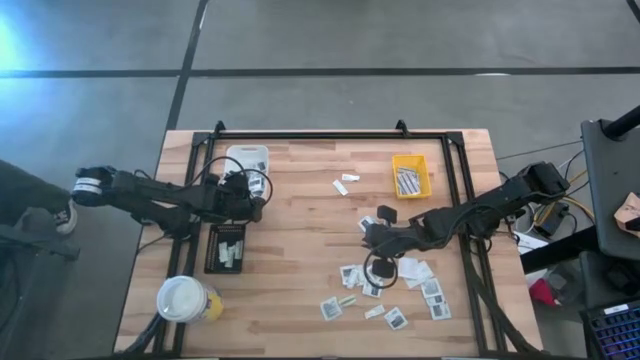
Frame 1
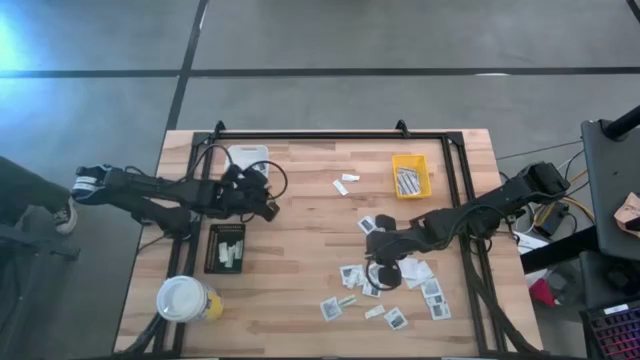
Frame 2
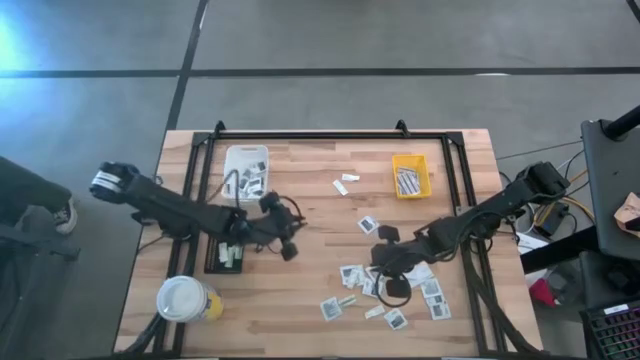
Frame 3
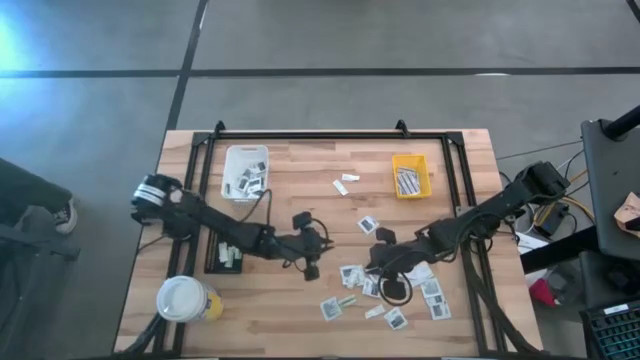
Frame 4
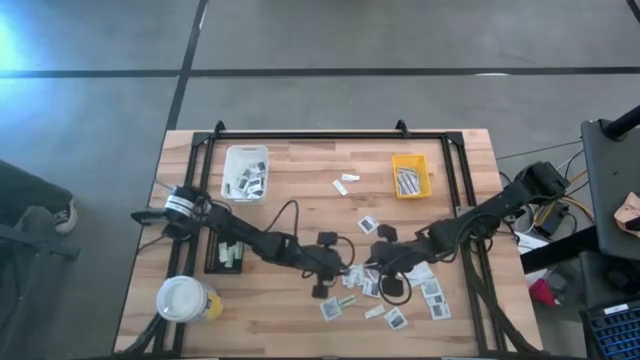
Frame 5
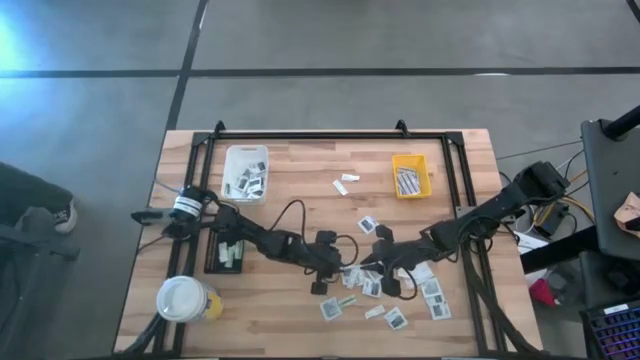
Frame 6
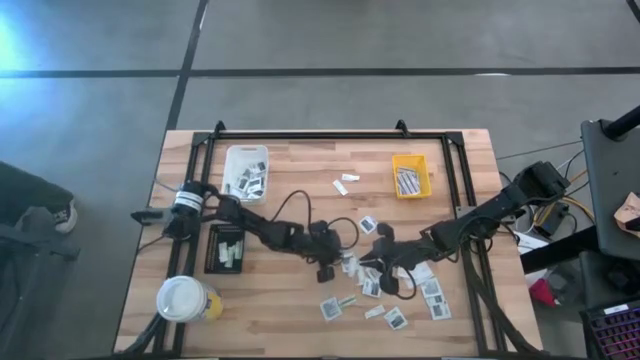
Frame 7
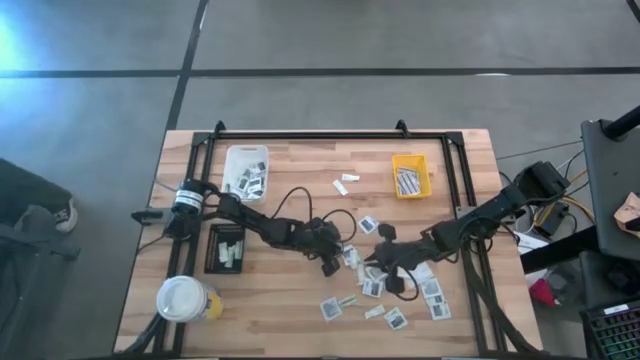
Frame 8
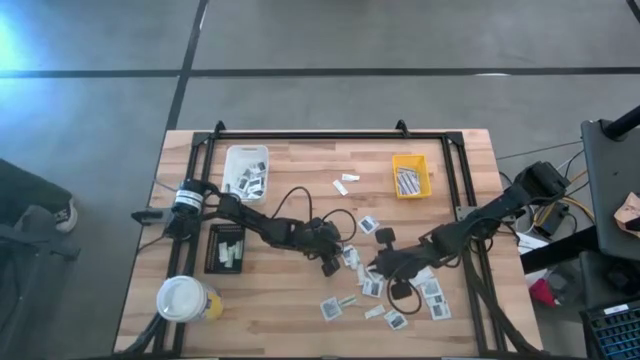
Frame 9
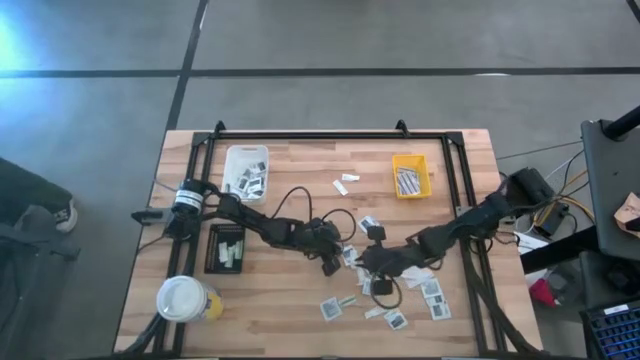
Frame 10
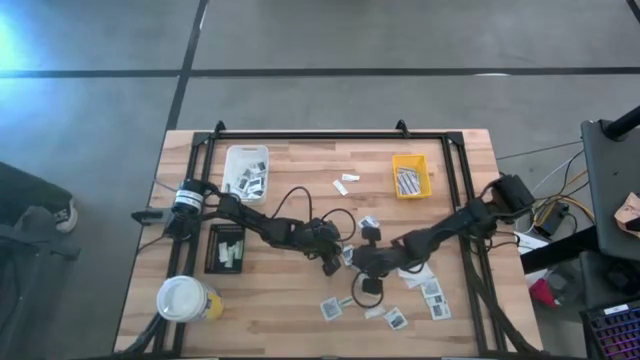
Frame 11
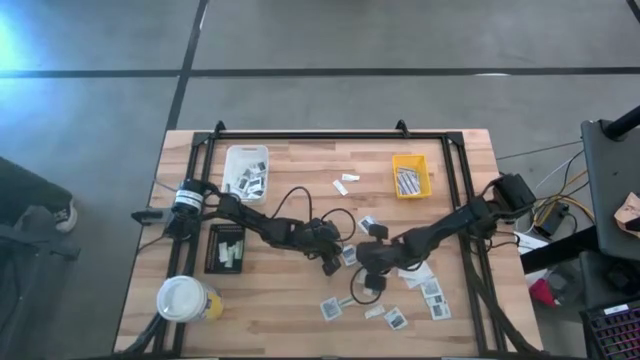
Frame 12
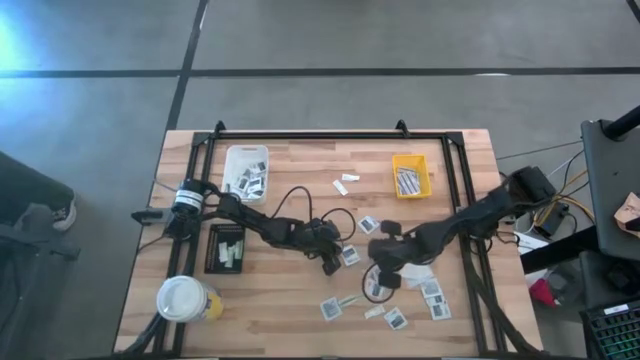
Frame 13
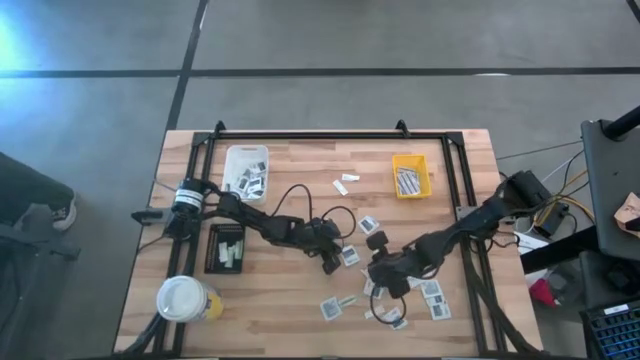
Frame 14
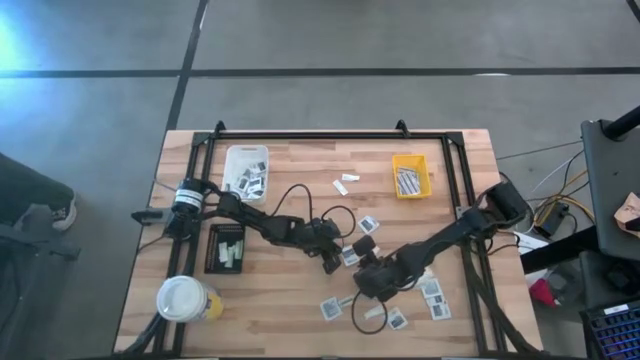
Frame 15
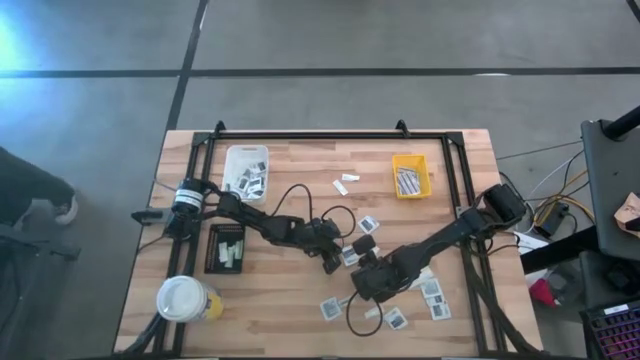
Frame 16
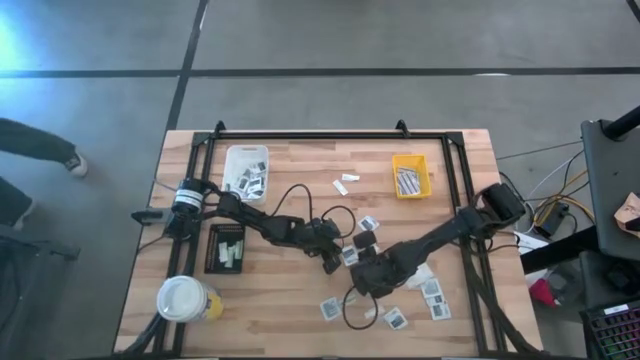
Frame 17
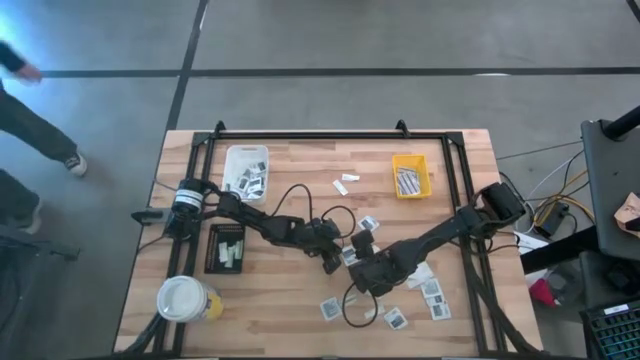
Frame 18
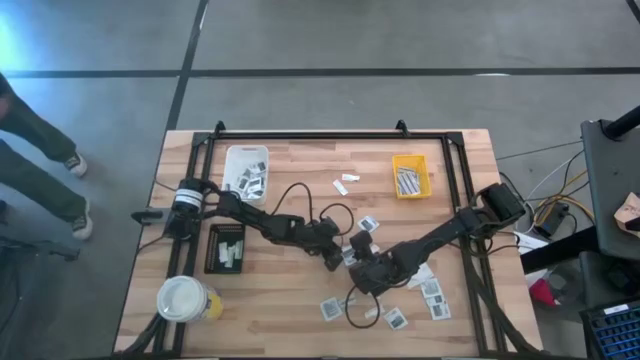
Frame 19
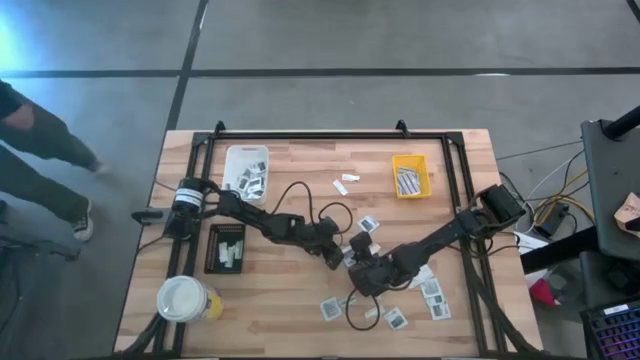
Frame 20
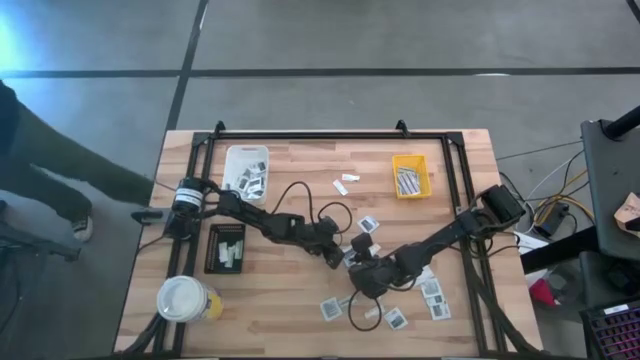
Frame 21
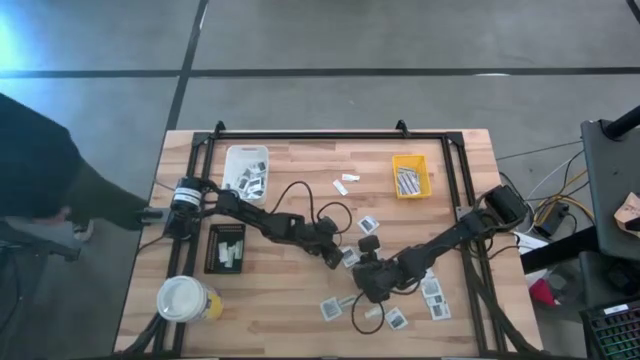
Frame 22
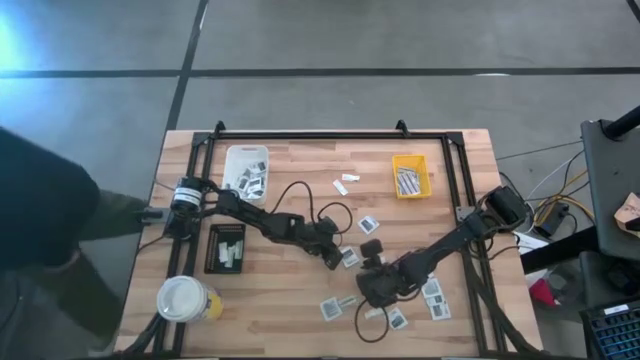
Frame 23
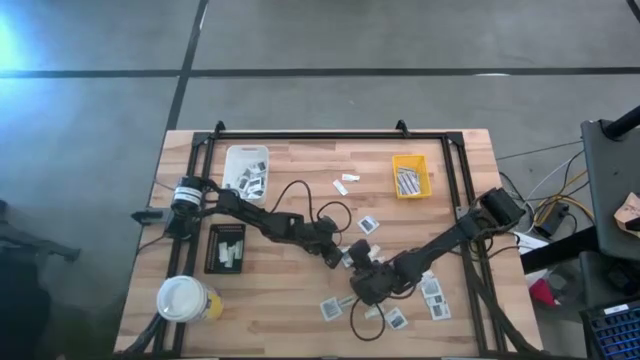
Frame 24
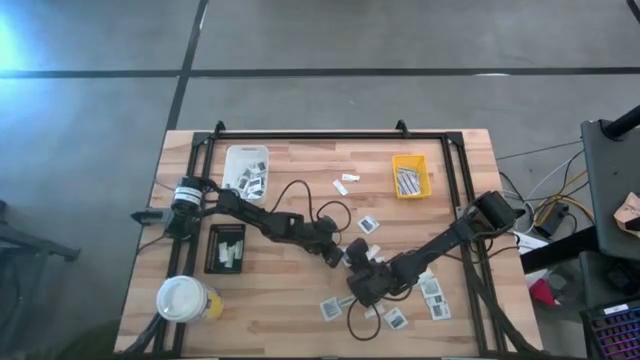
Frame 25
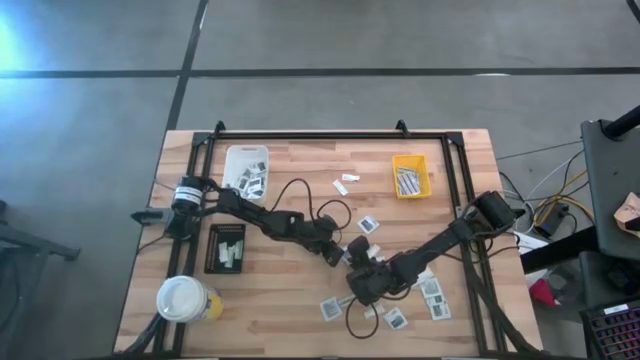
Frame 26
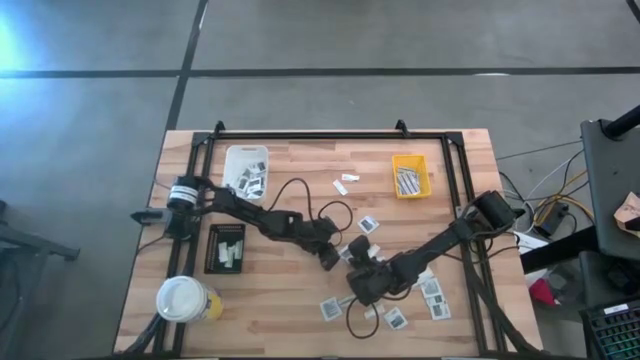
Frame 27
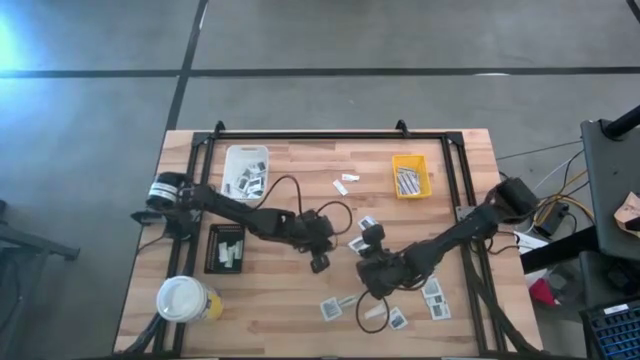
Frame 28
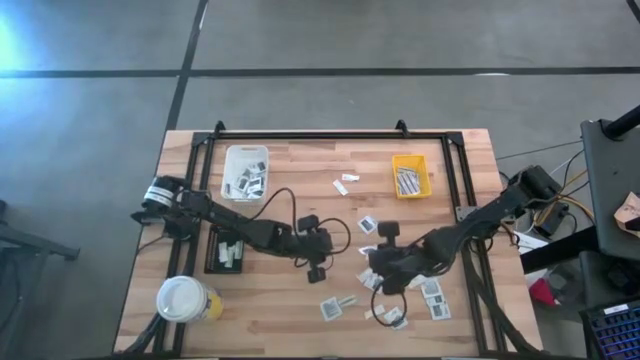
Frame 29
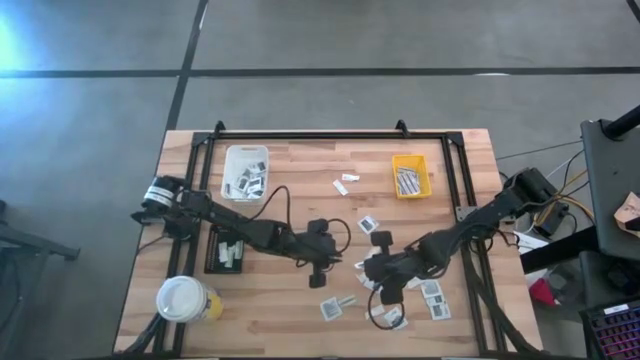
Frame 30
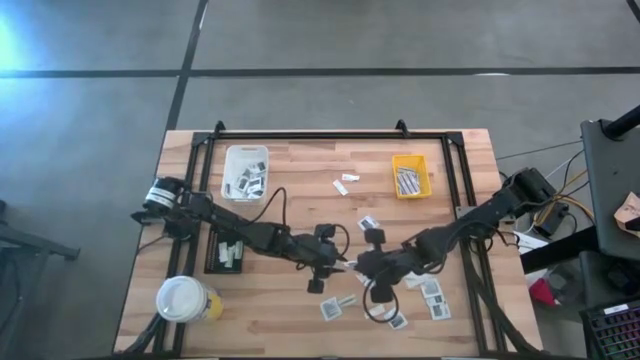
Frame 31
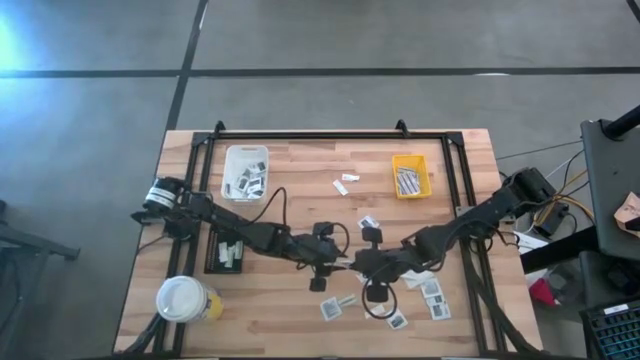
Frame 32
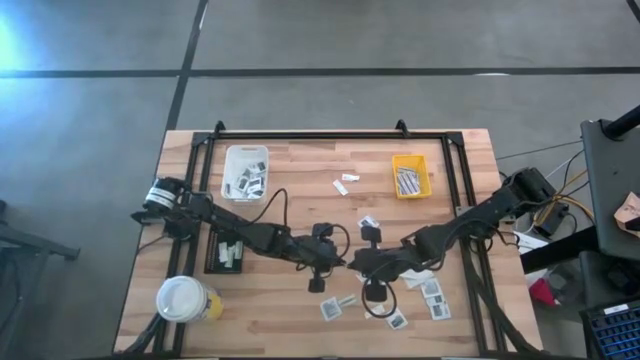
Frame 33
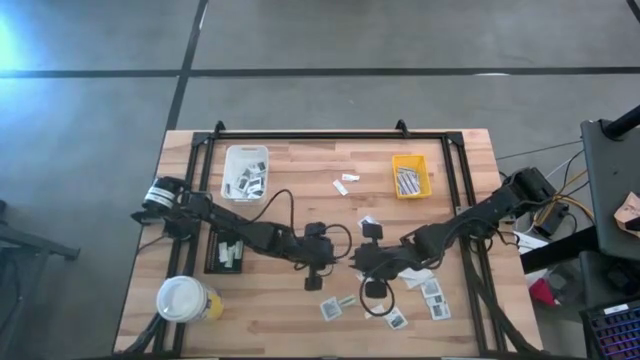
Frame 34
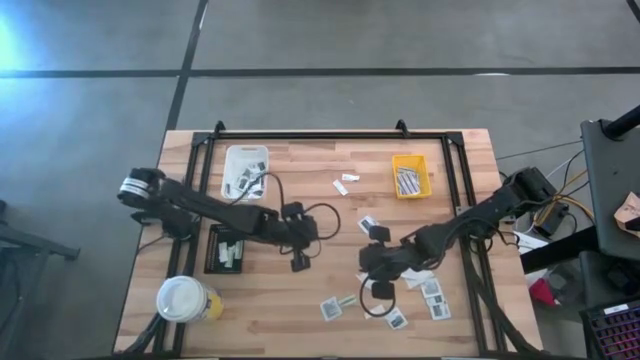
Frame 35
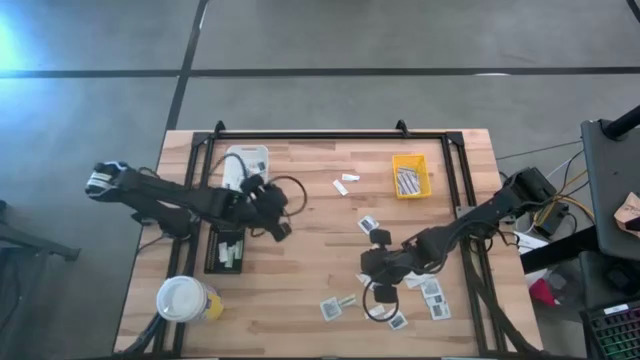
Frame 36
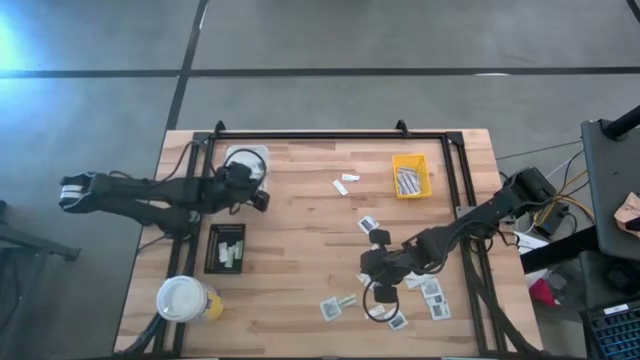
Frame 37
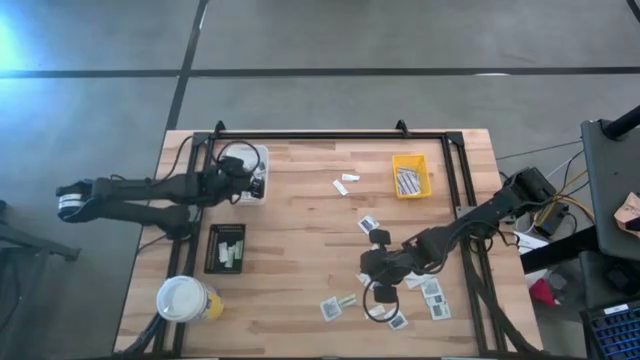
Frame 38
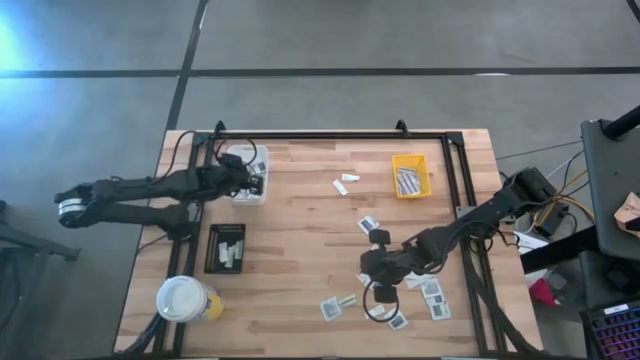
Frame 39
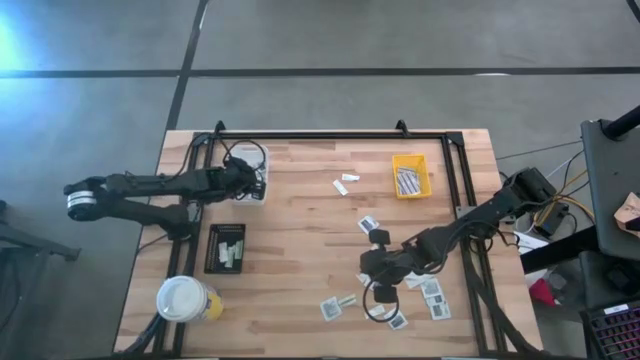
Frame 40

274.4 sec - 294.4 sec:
Task: Pick & Place First Aid Supplies
Put the gray towelette pack into the white bin

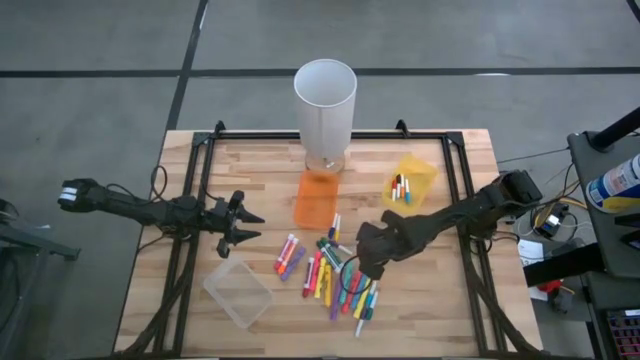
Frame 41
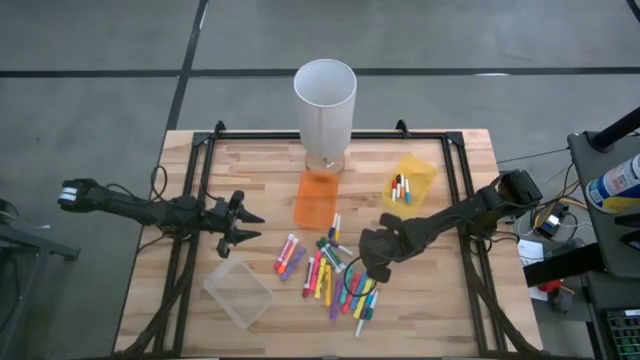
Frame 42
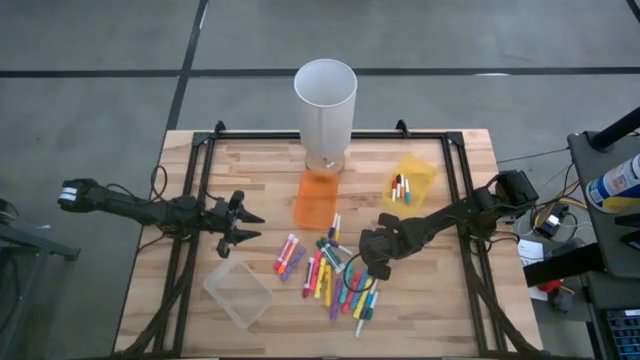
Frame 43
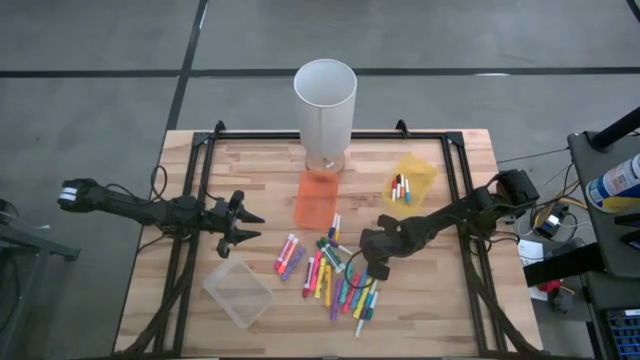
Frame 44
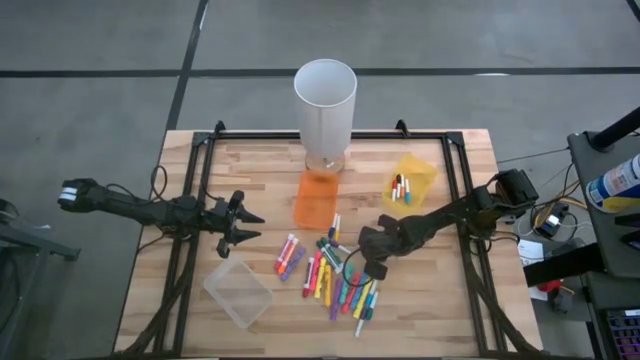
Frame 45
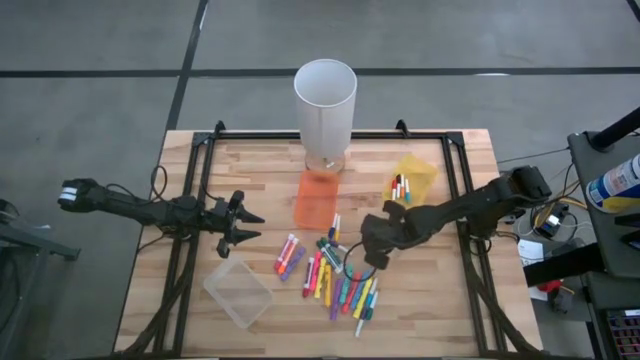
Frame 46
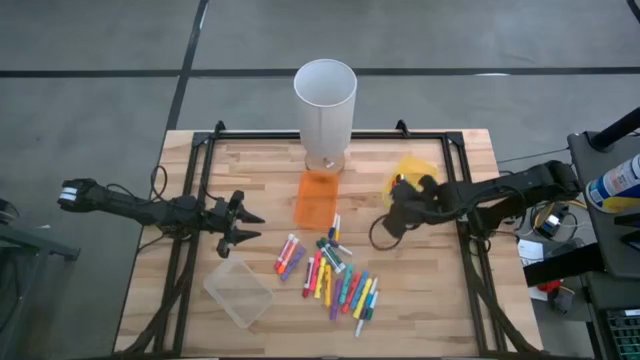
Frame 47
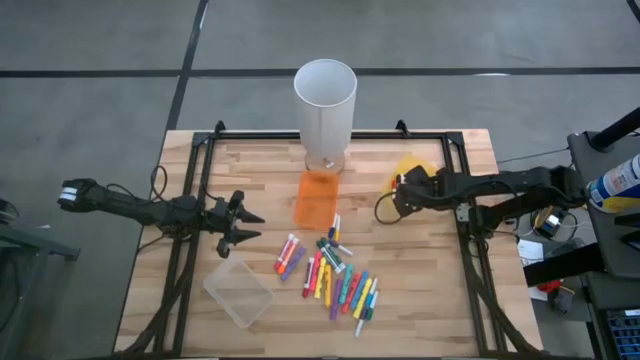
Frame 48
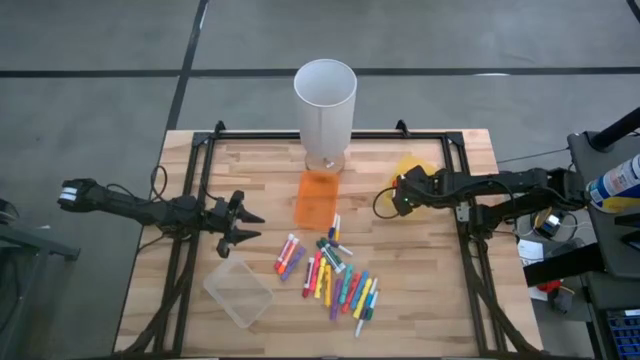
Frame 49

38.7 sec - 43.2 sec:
Task: Pick & Place Markers
Put the bottom small blue marker pen into the yellow bin
